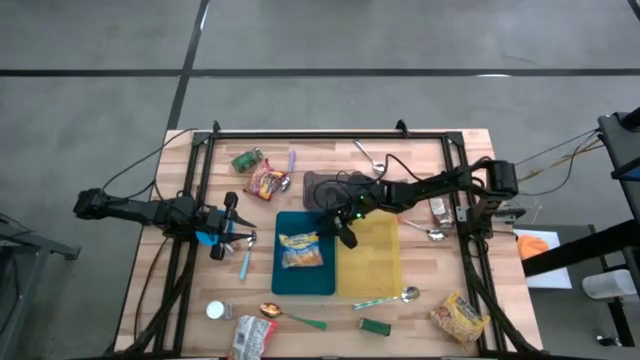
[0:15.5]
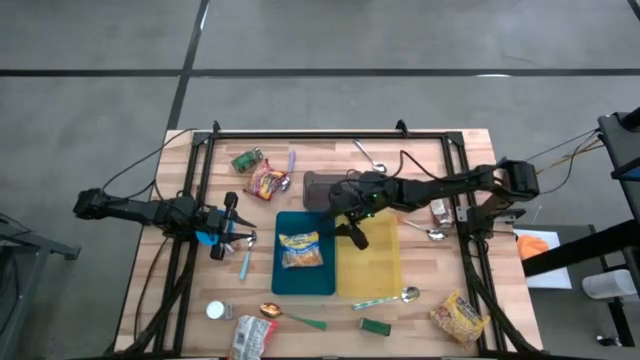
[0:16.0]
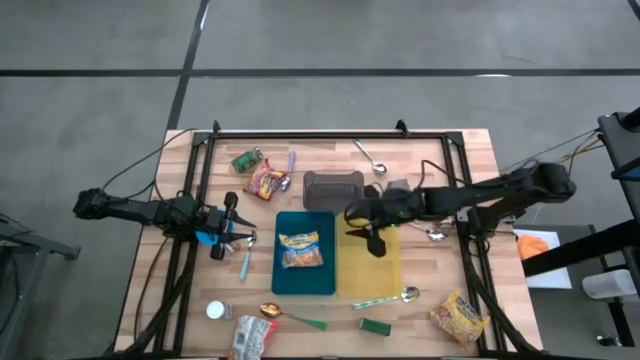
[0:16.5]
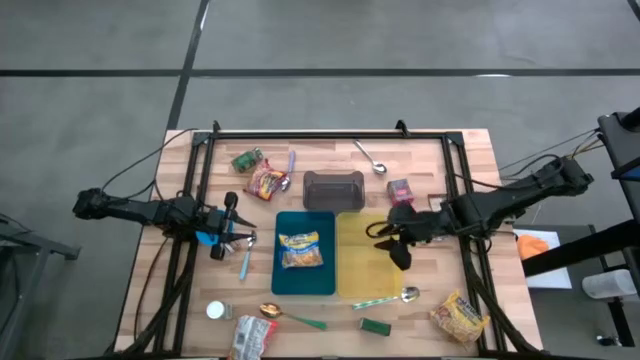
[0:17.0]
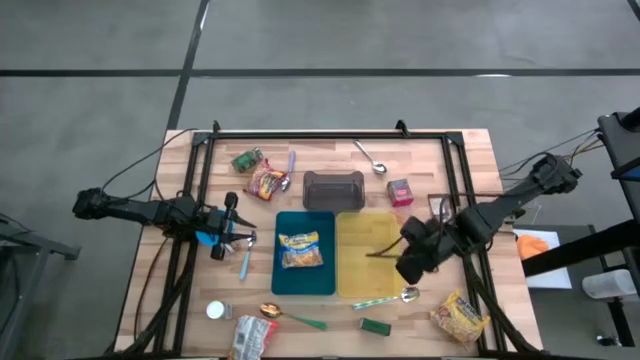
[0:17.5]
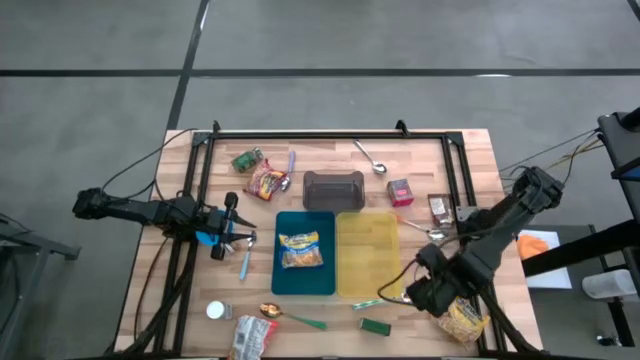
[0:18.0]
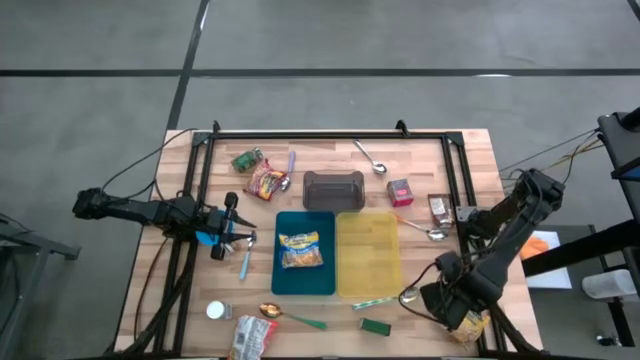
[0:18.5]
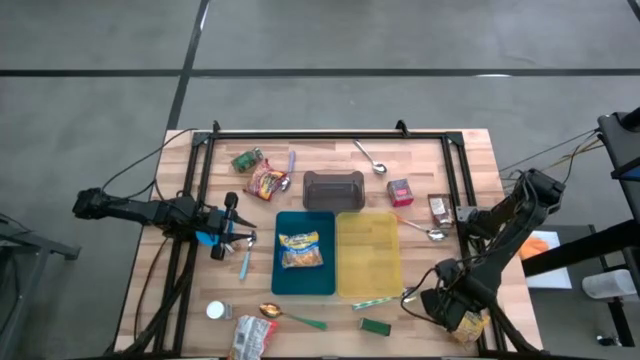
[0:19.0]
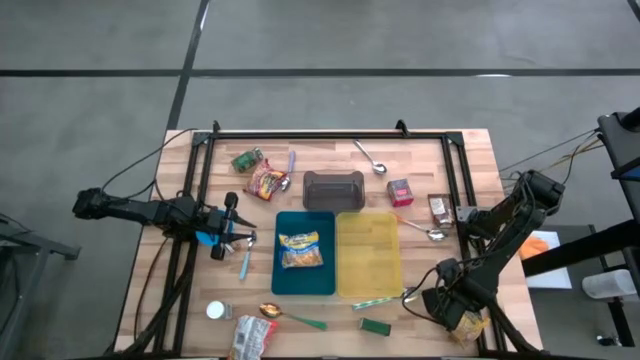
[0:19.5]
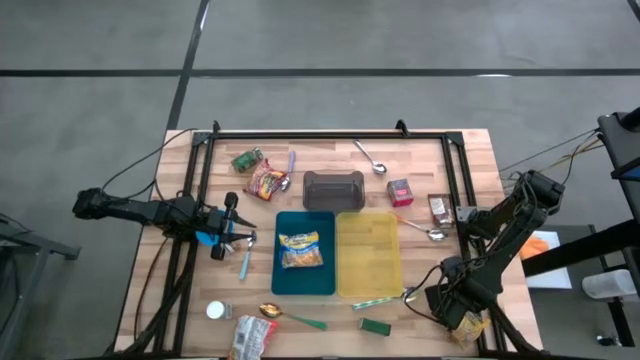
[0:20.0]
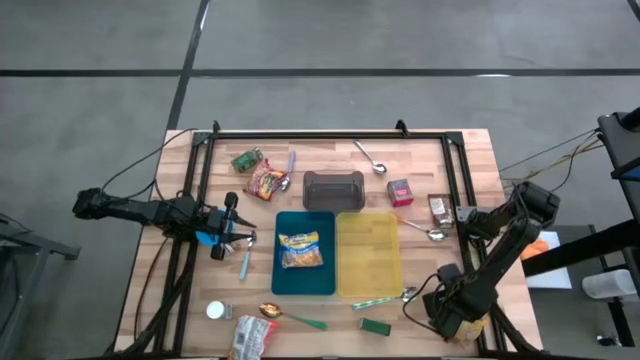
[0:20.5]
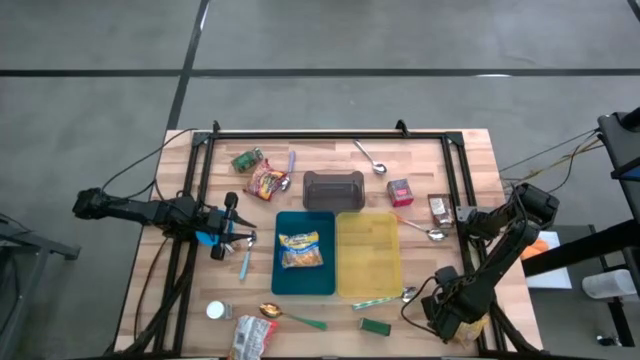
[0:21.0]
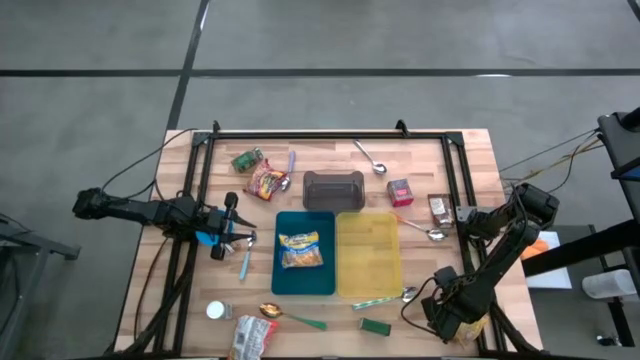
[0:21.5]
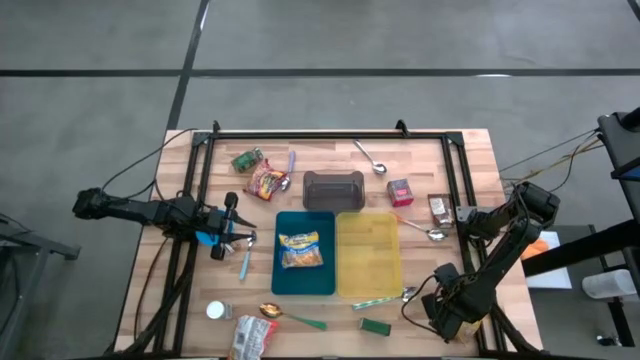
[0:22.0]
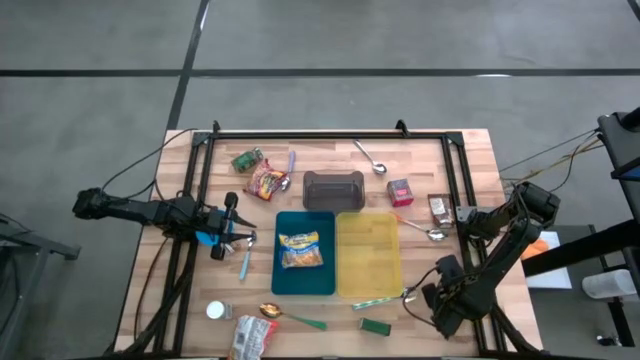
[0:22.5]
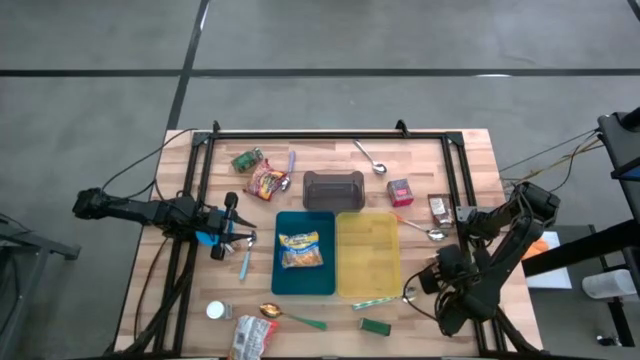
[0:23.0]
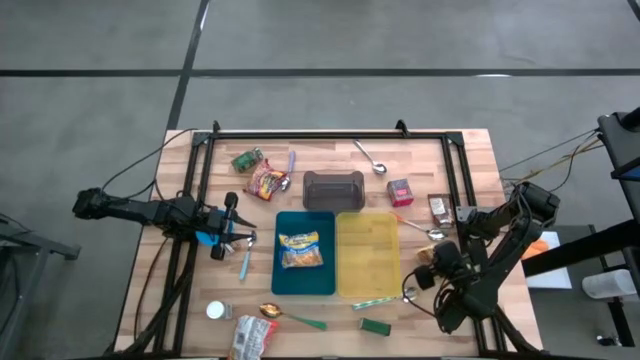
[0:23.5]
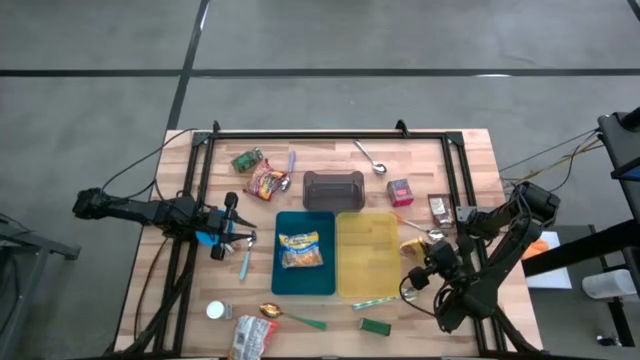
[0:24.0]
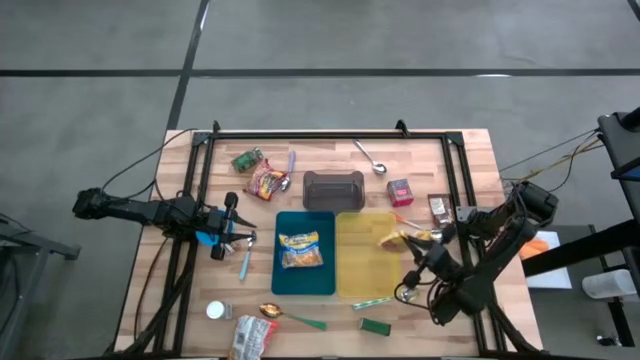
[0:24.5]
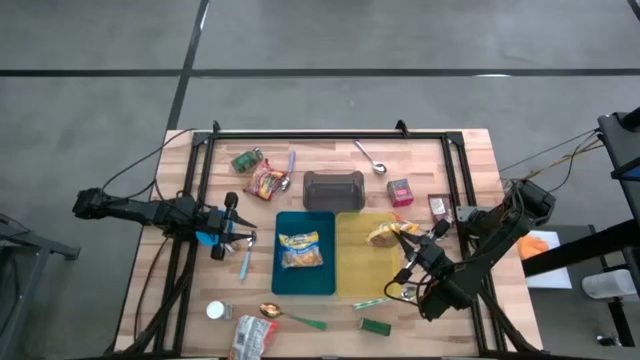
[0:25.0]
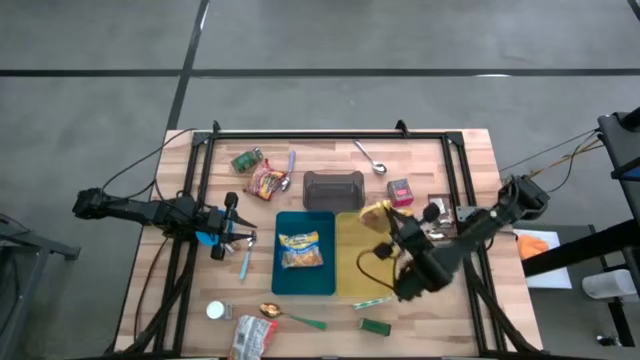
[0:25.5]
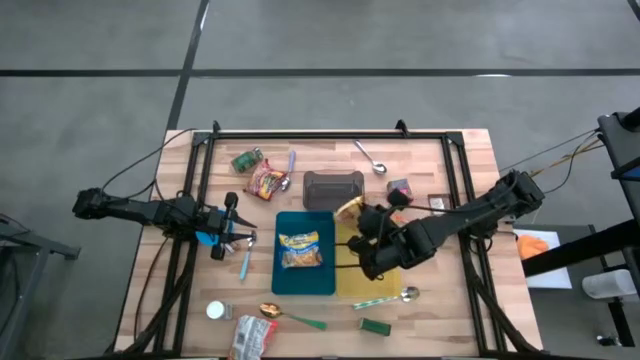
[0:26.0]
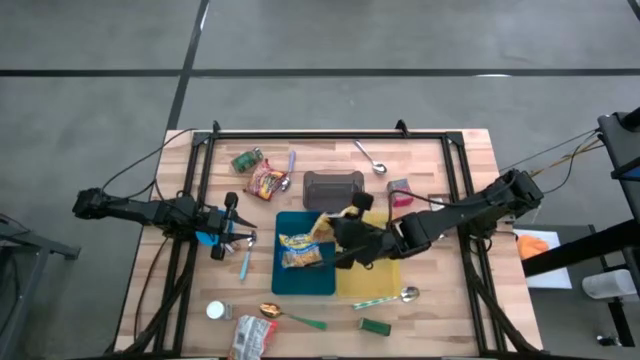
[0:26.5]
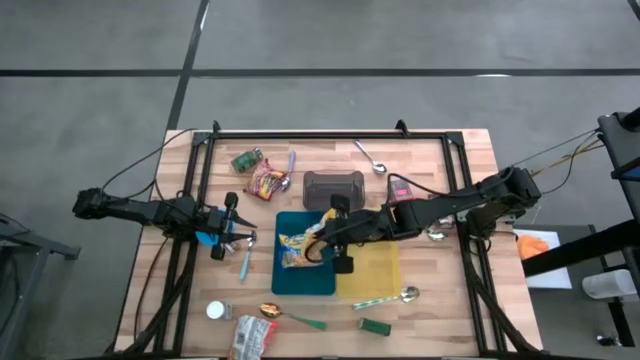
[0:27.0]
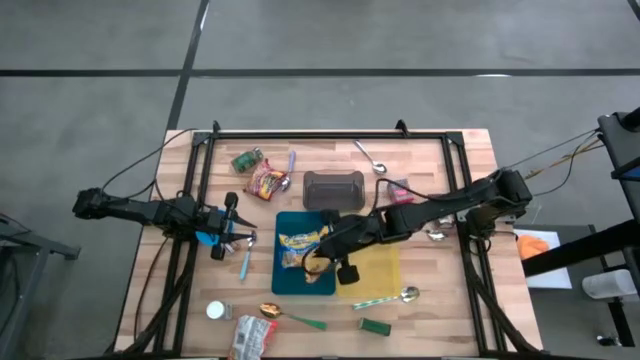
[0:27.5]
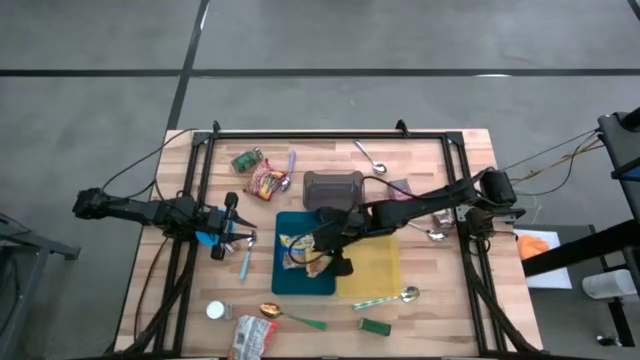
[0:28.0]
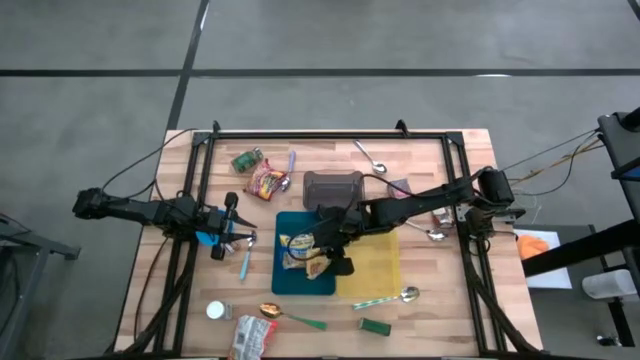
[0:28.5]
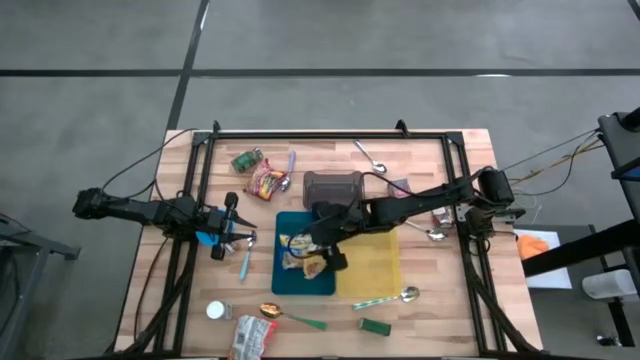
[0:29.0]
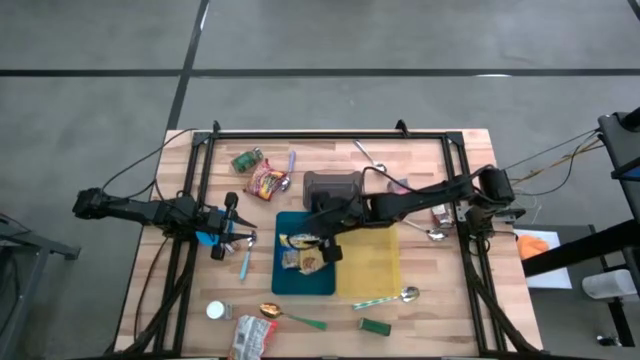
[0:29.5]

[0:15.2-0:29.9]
Put the yellow noodle pack into the blue bin
